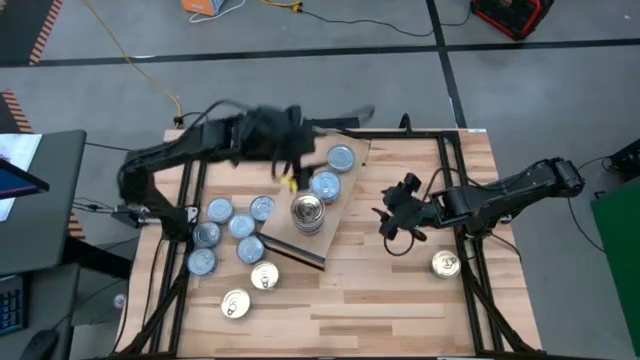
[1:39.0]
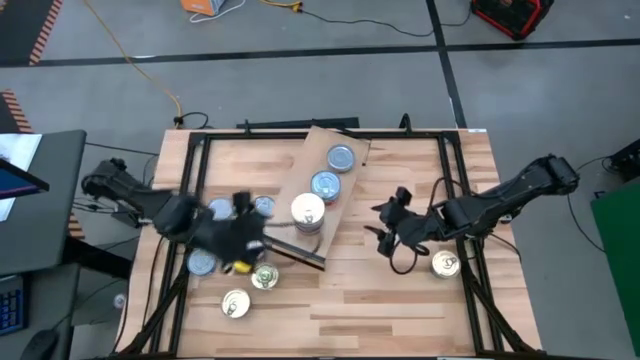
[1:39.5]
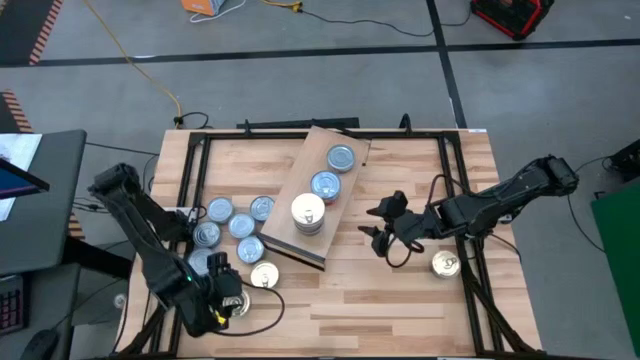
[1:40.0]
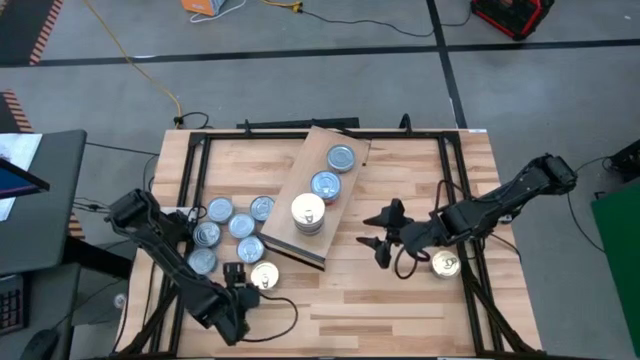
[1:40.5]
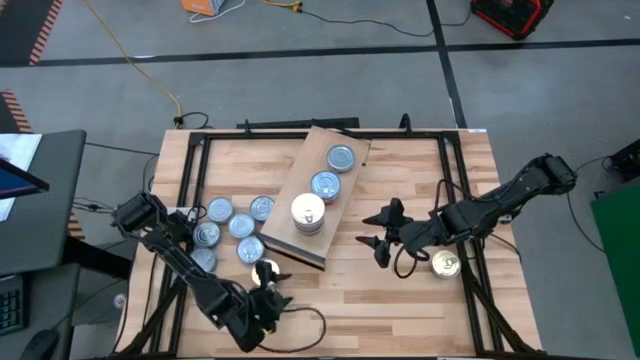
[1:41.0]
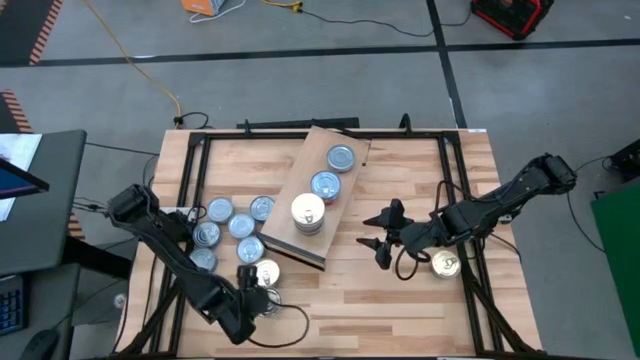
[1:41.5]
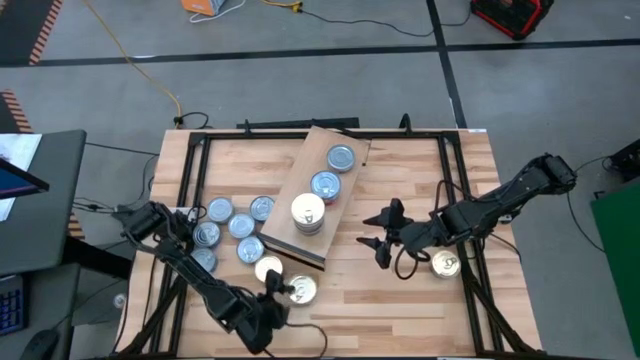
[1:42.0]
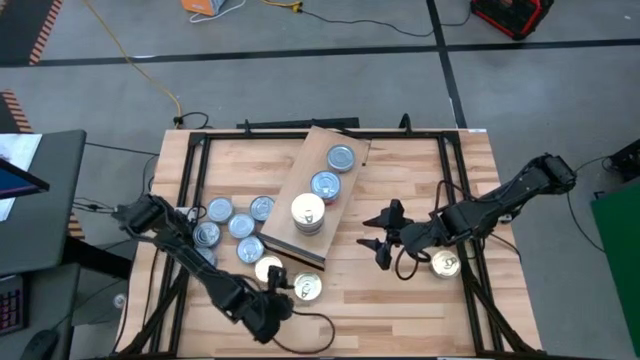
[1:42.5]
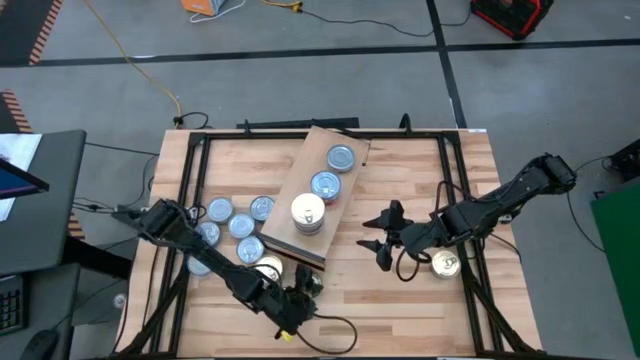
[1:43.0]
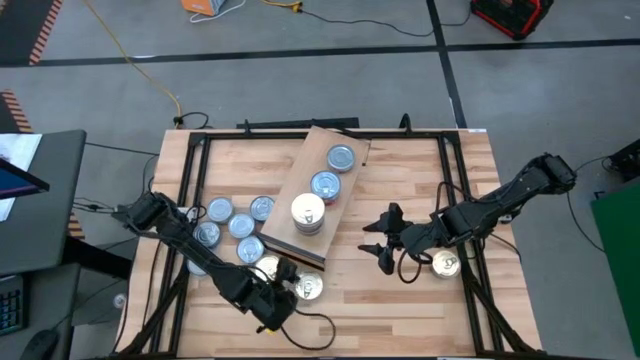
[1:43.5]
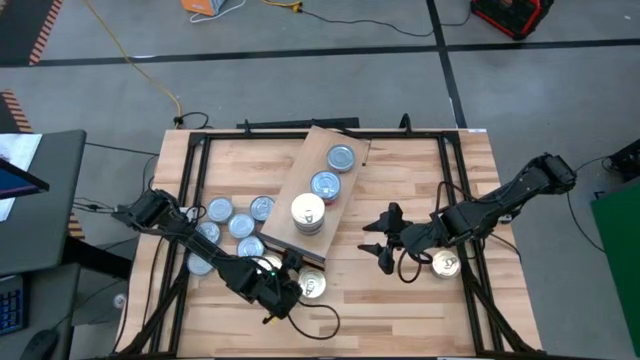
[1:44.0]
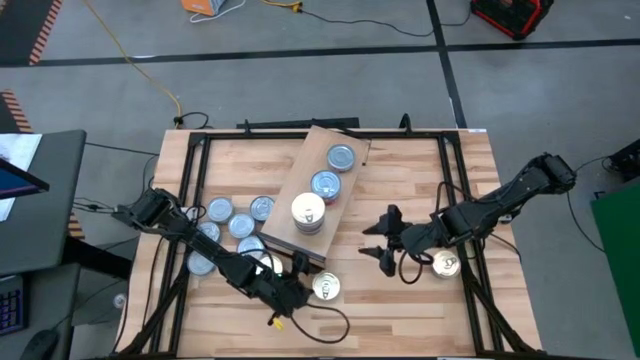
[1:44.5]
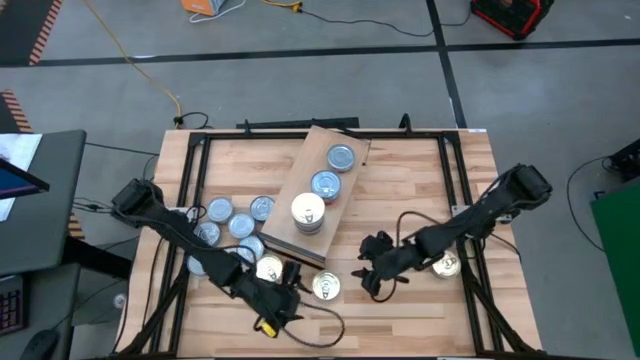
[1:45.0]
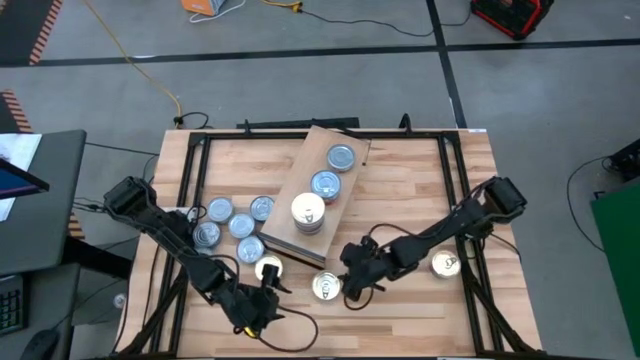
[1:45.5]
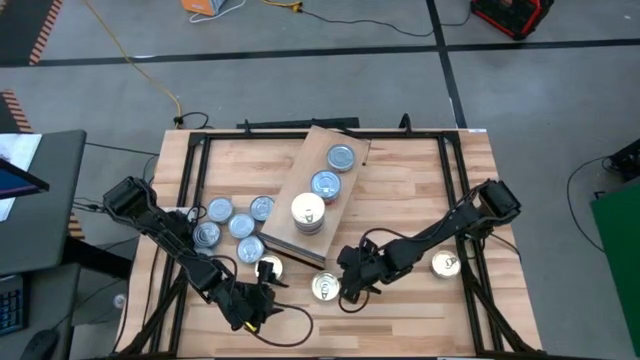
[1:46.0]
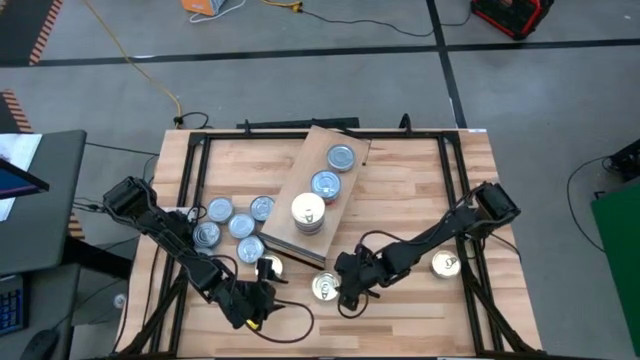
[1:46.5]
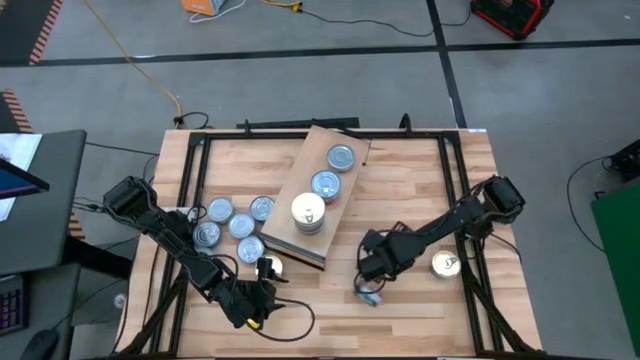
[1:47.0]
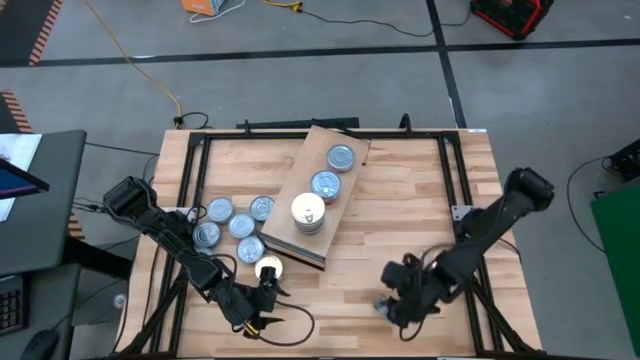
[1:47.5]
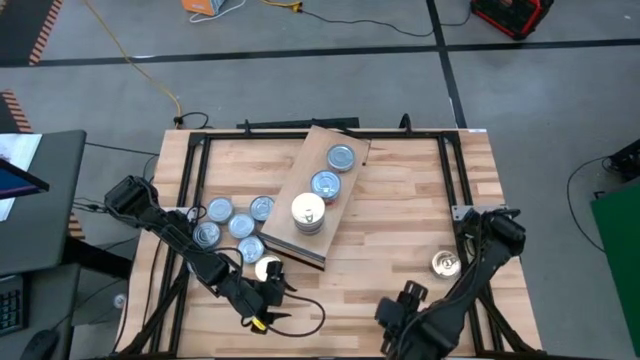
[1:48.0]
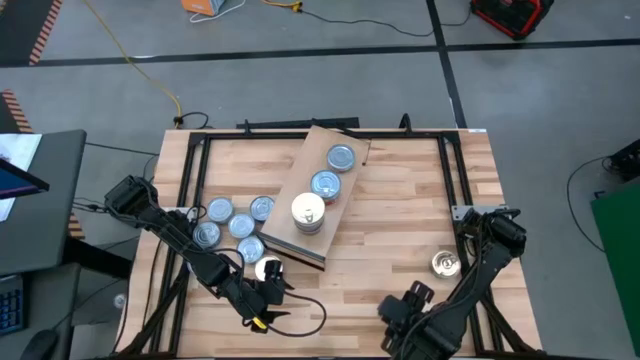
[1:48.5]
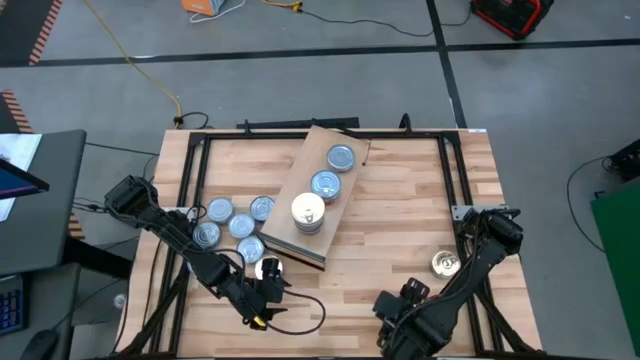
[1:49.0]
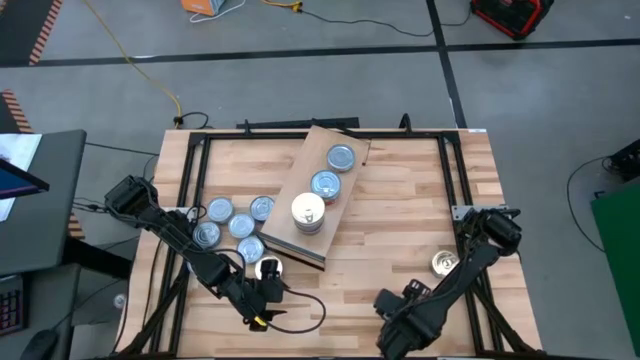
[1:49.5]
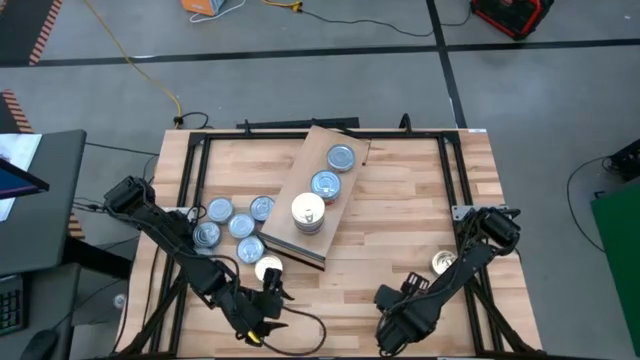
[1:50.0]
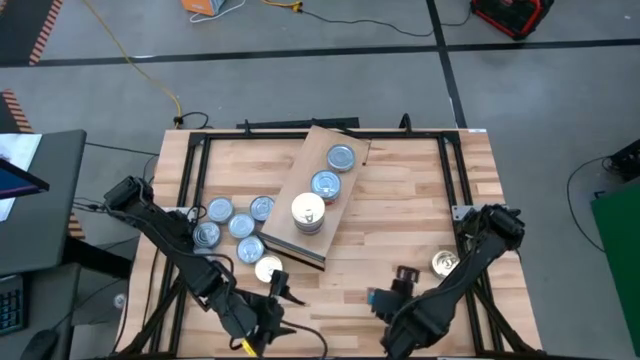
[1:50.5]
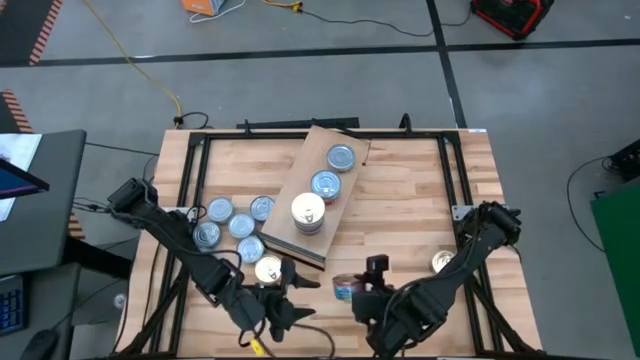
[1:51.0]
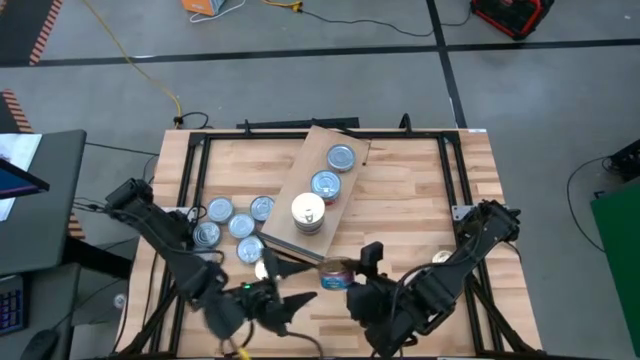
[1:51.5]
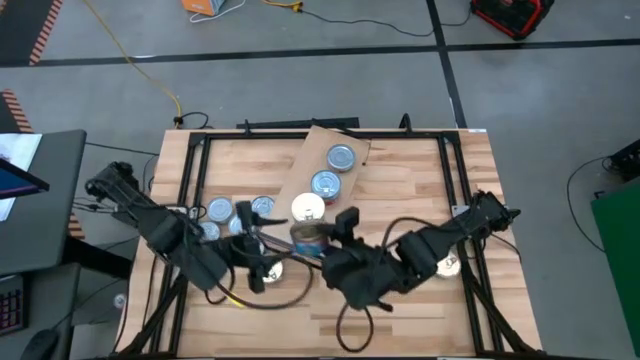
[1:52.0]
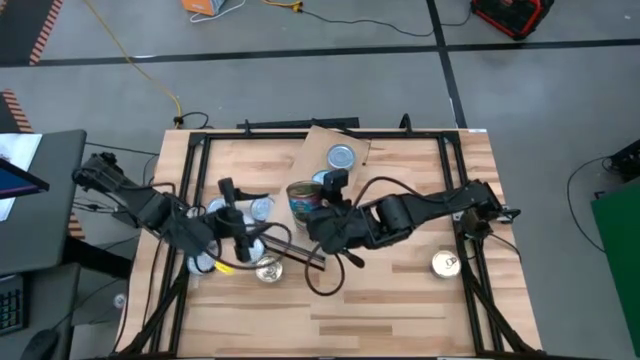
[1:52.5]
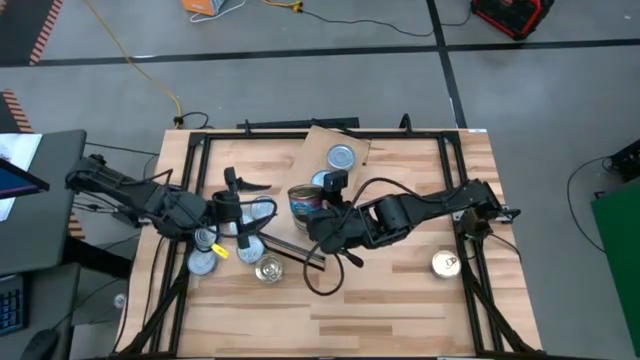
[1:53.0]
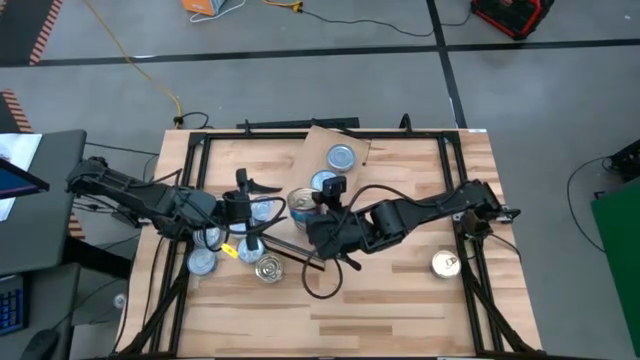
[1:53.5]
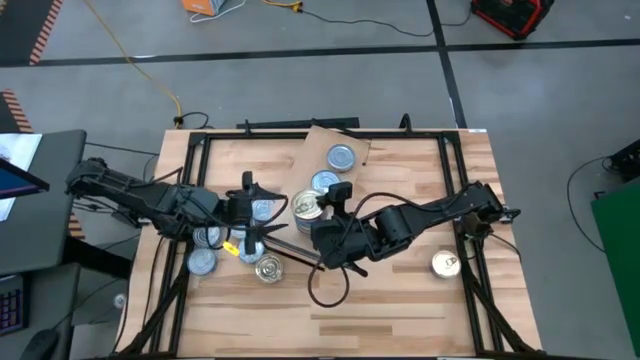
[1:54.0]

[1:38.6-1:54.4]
Task: Stack canned seafood by type on shelf
Stack the blue pink tuna can on top of the blue pink tuna can on the shelf

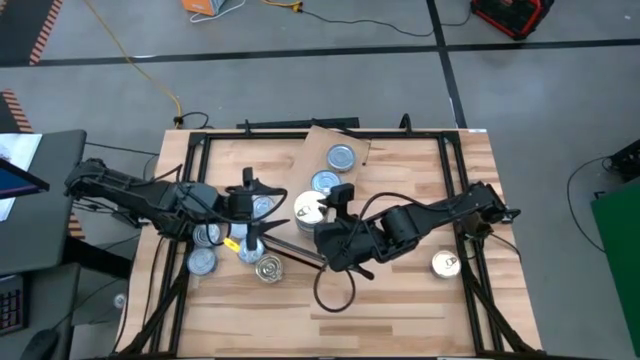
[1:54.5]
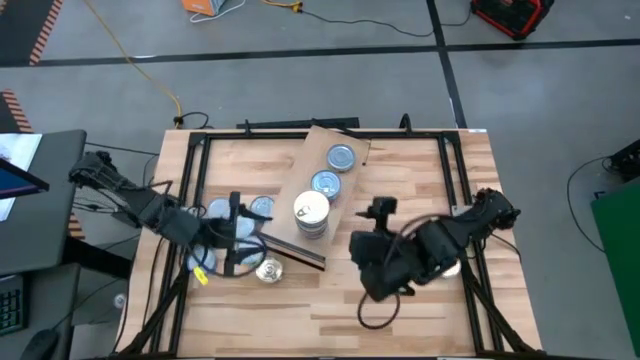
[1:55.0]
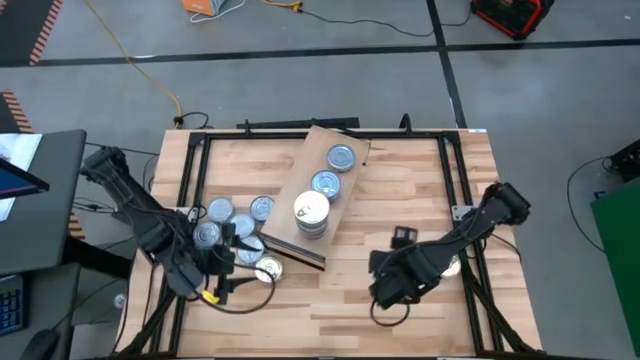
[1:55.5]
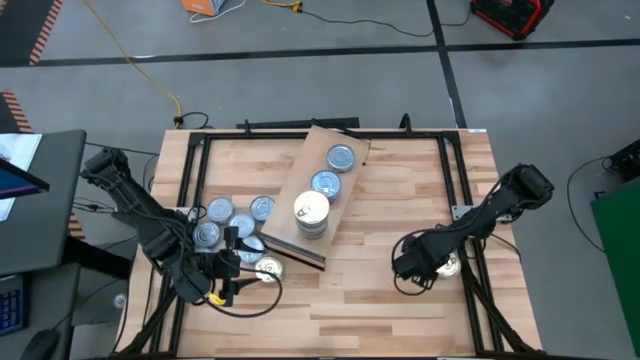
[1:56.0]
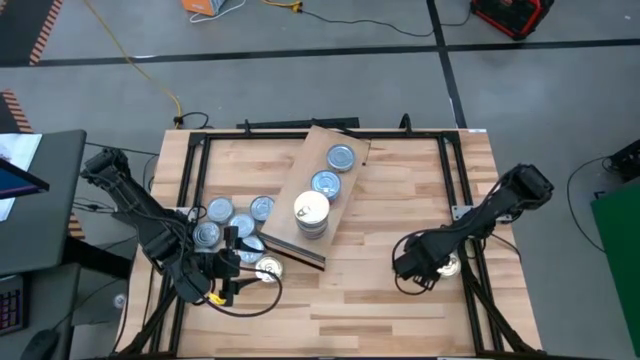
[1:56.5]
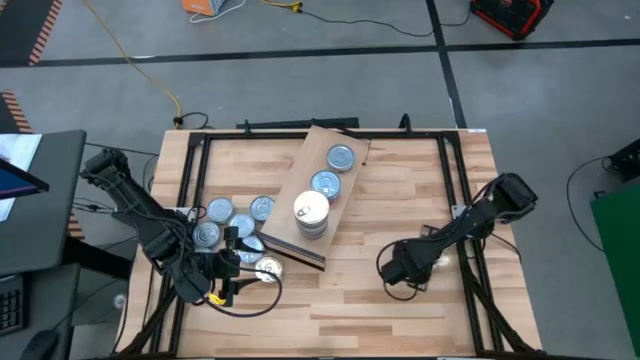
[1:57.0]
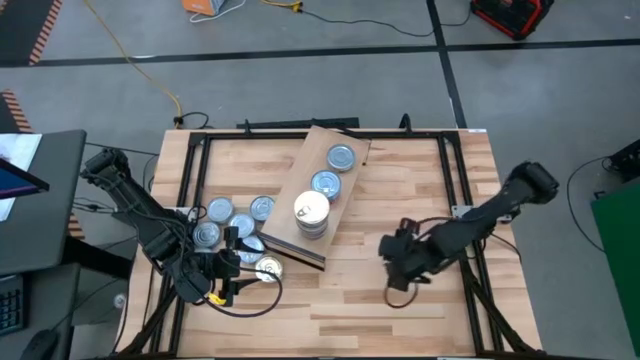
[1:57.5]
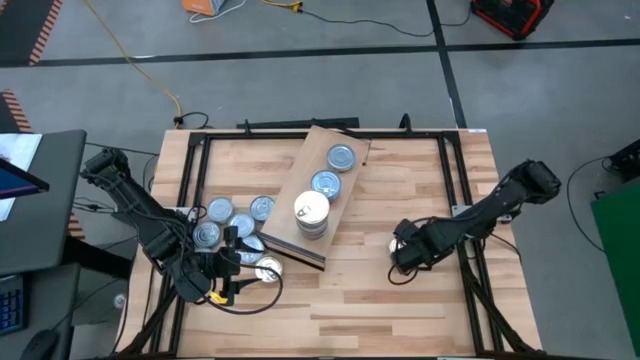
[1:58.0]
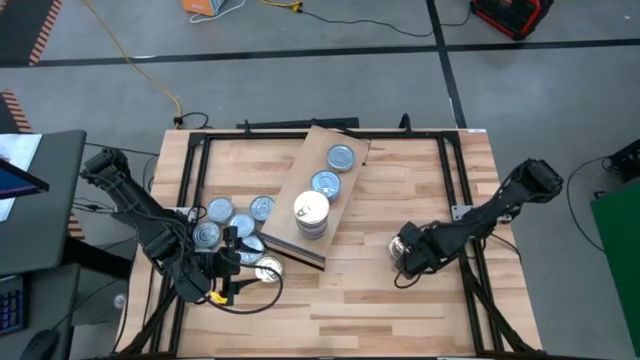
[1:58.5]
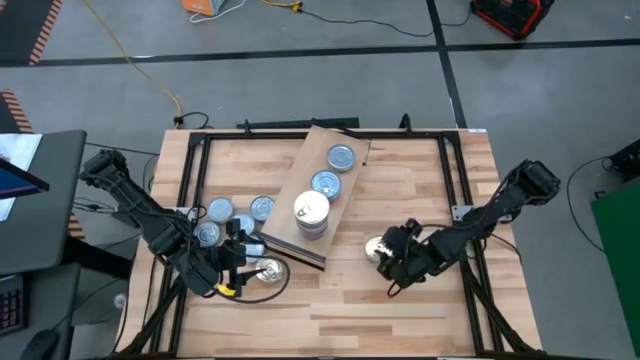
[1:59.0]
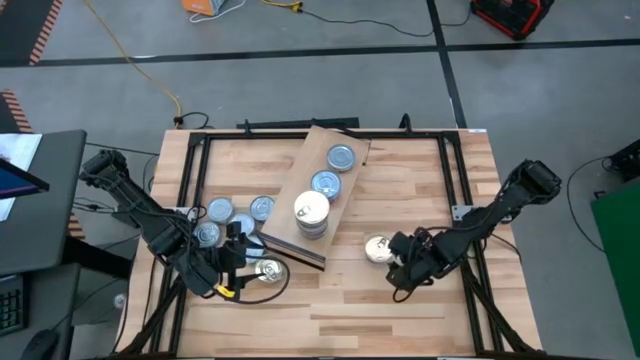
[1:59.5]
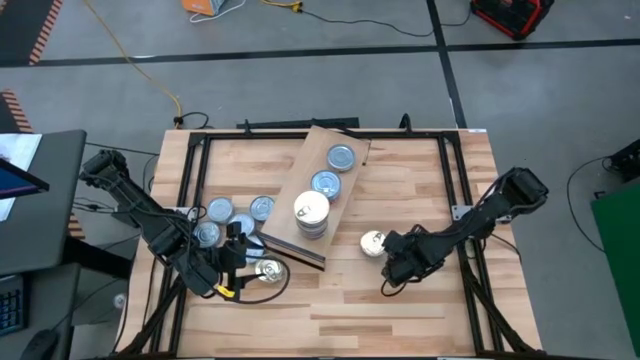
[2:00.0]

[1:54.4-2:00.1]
Stack the blue pink tuna can on top of the blue pink tuna can on the shelf
